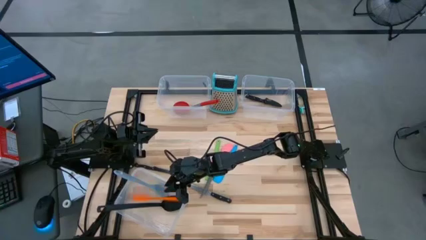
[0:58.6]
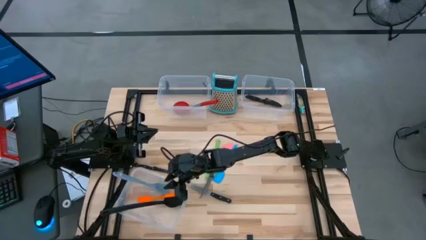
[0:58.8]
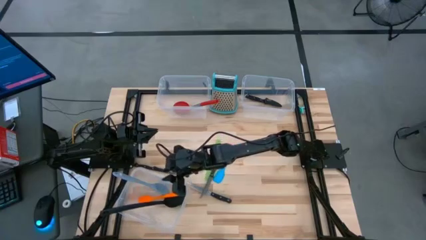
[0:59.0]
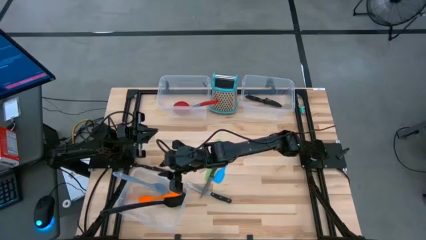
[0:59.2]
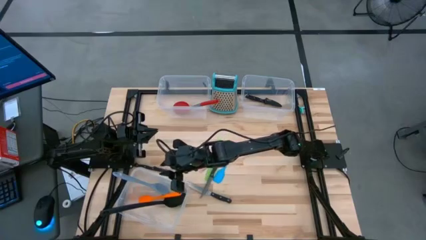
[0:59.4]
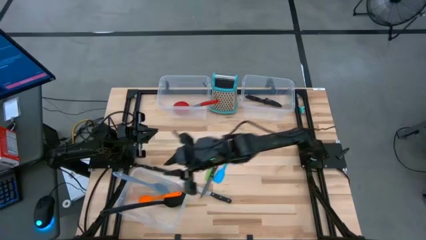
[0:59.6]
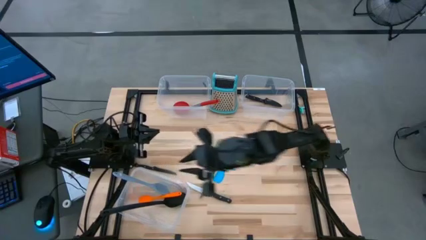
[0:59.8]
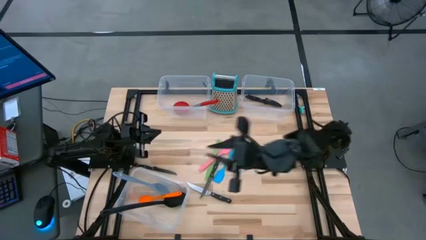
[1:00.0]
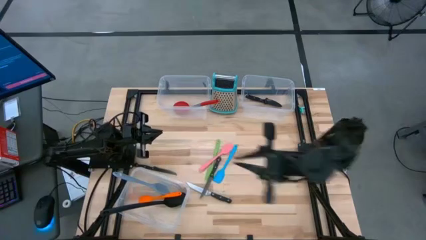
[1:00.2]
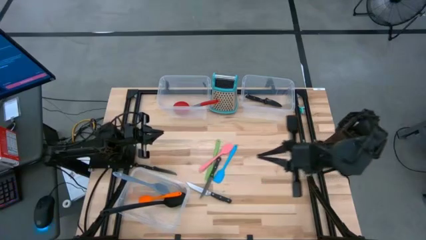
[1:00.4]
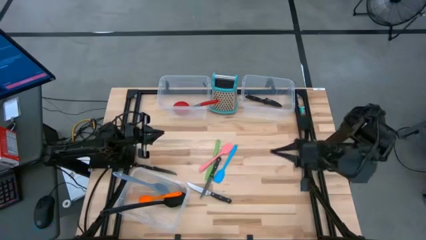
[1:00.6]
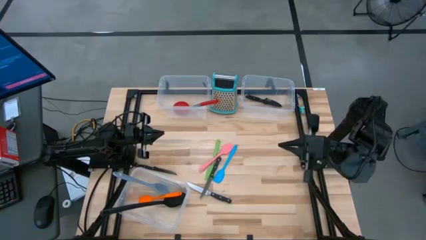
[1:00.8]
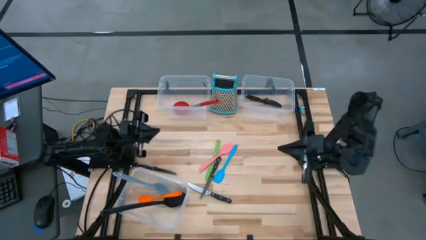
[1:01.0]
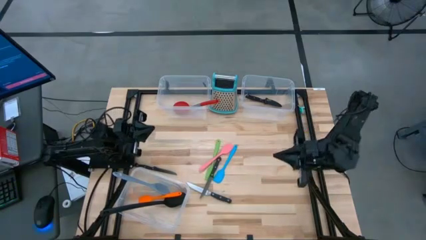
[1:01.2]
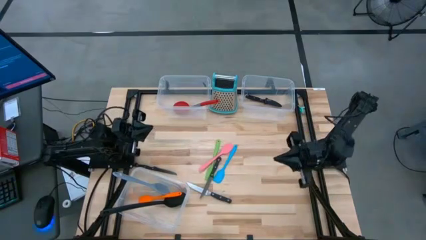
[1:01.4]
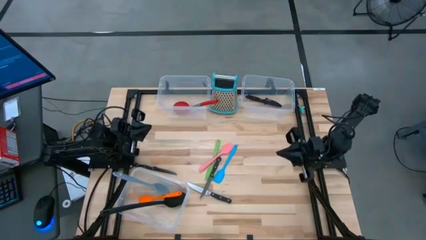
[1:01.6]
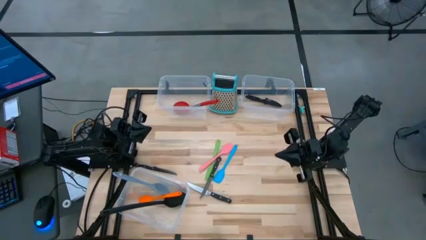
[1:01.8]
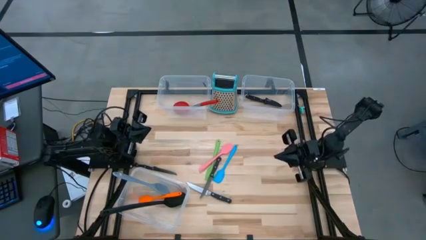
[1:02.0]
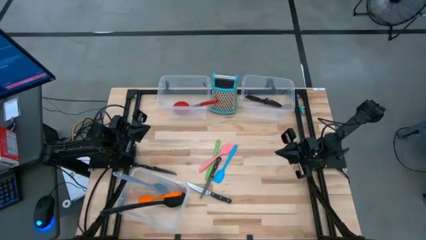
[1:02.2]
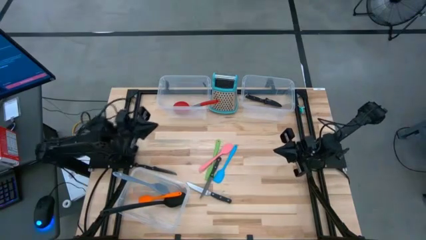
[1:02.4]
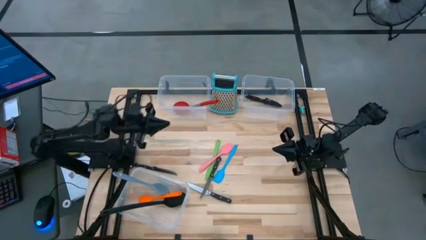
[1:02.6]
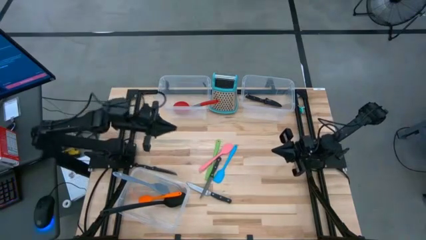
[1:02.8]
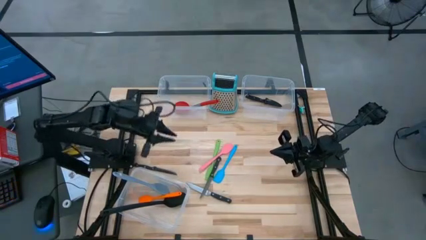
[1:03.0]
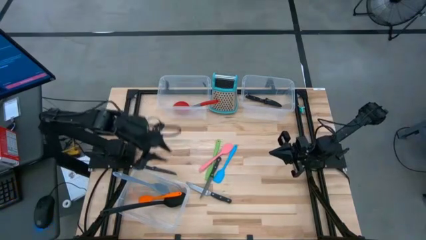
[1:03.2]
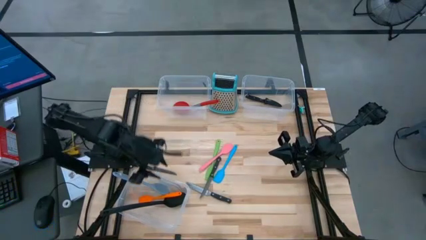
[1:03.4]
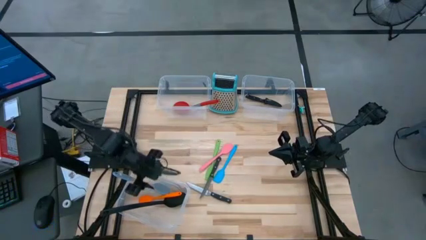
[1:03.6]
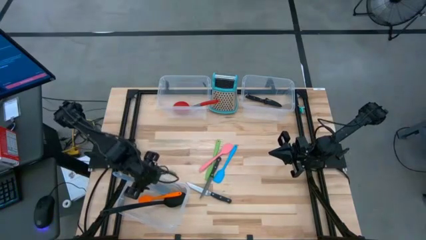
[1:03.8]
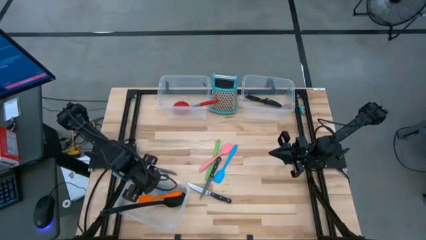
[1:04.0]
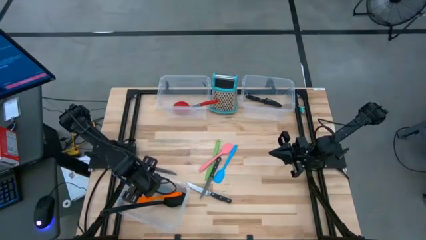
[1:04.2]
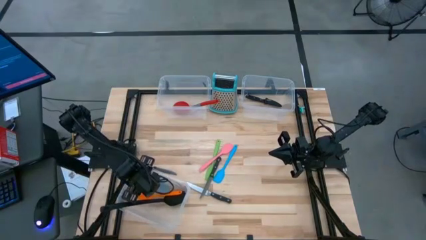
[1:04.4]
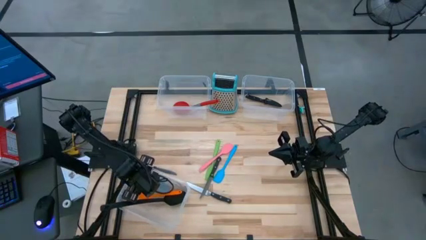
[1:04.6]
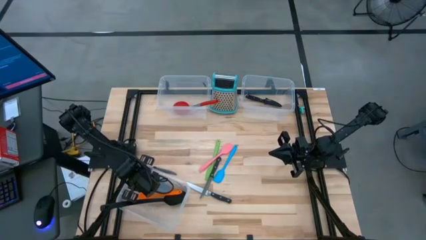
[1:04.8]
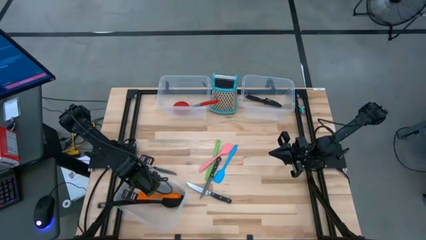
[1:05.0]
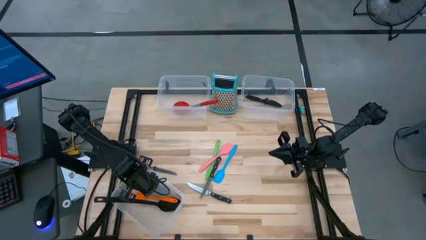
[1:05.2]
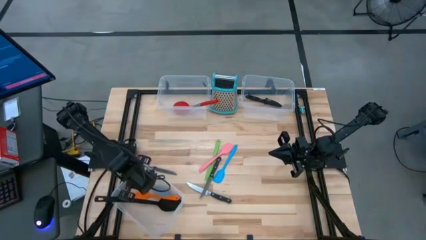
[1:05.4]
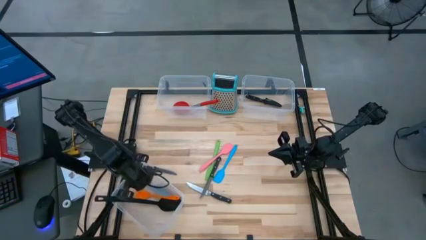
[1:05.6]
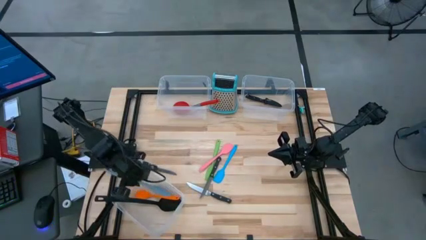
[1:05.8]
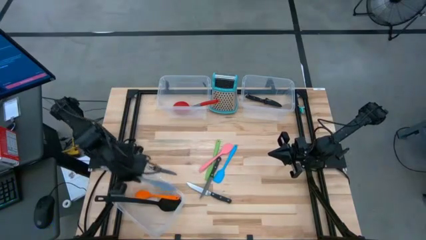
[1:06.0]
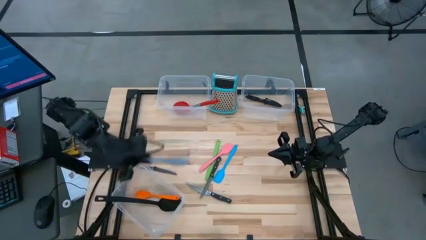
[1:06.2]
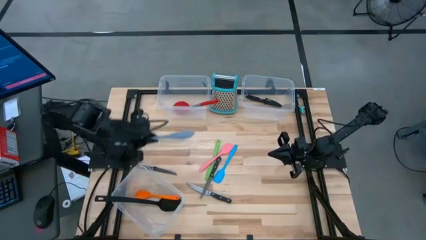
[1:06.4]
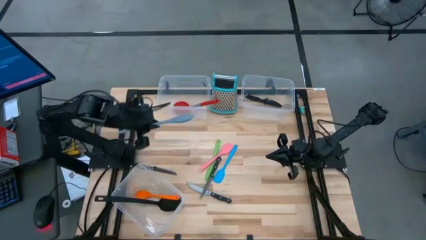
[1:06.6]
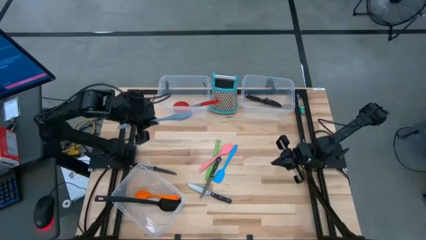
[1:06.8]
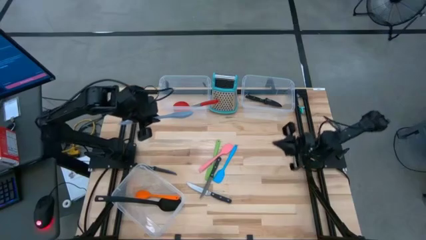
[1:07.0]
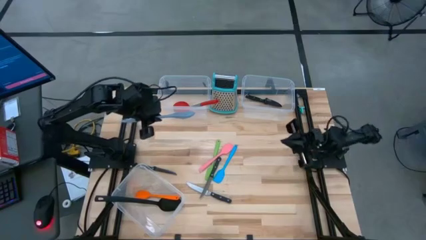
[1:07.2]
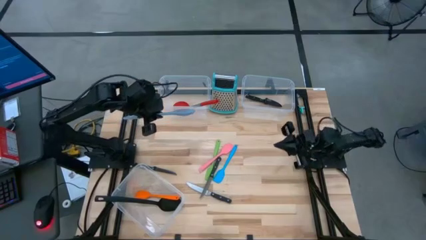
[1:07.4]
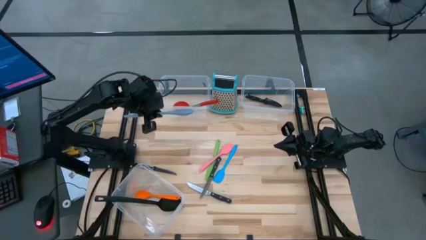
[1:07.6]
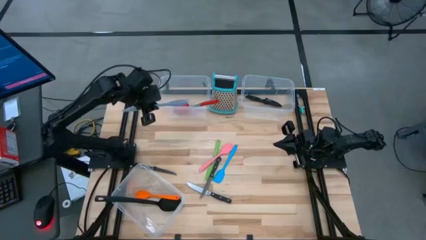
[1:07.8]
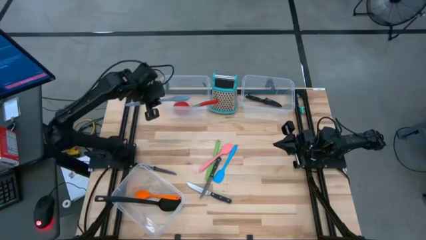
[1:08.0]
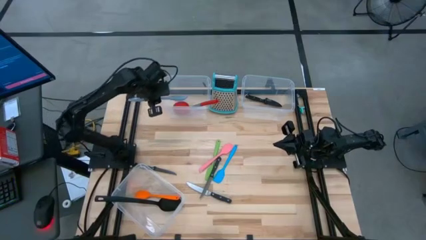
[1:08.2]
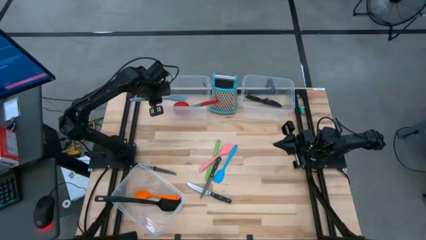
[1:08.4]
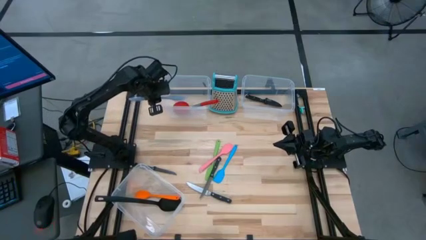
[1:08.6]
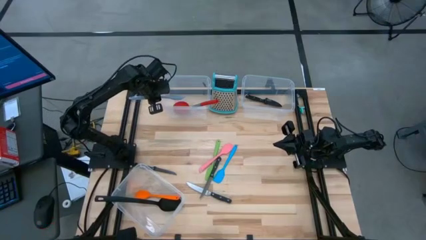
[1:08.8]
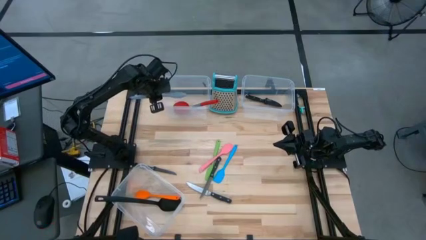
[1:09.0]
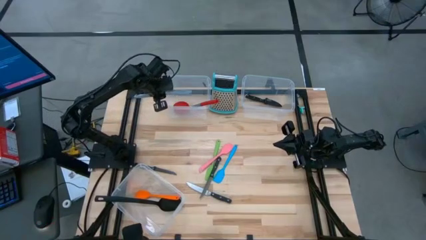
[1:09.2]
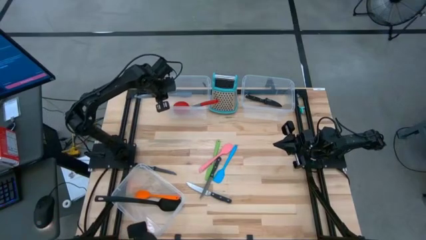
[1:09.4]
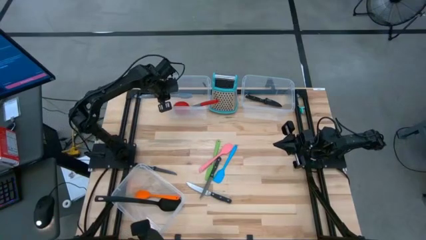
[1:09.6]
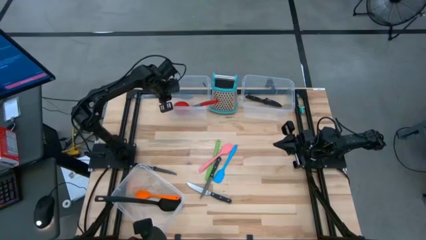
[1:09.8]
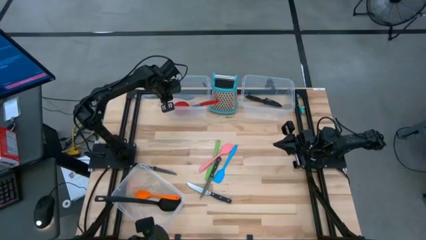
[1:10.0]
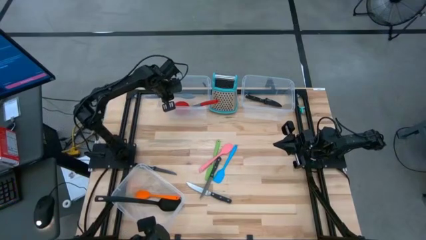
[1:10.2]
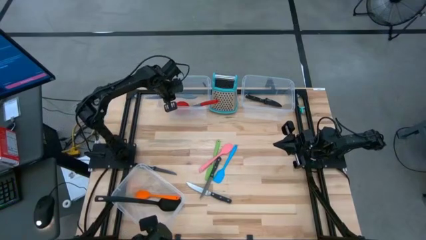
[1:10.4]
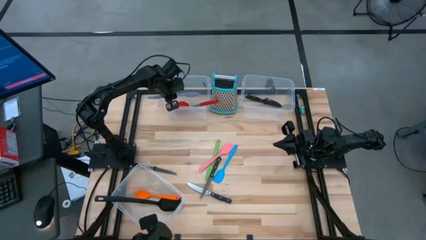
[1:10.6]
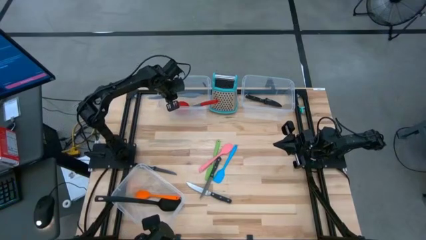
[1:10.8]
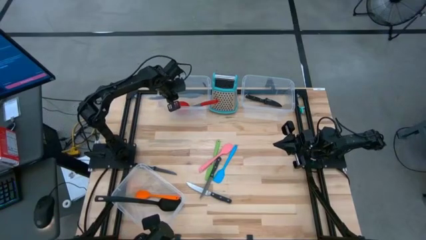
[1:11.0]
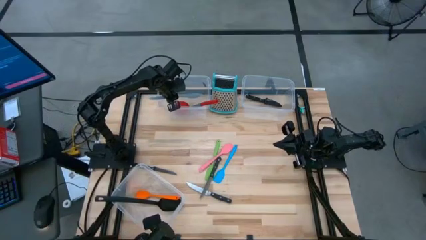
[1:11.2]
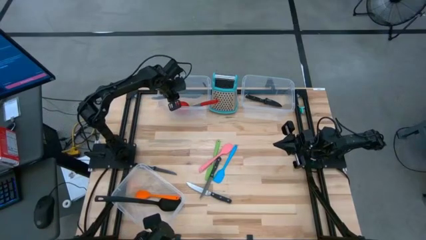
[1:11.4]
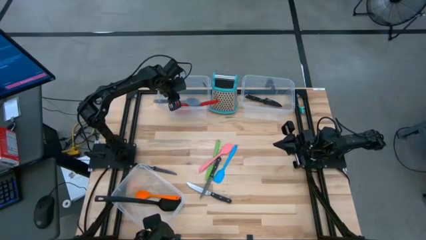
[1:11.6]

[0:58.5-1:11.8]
Task: Pick & Place Kitchen Items
Put the grey serving spoon from the bottom transparent bin to the top left transparent bin
